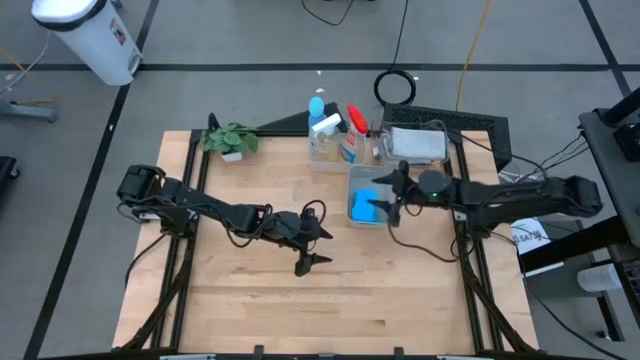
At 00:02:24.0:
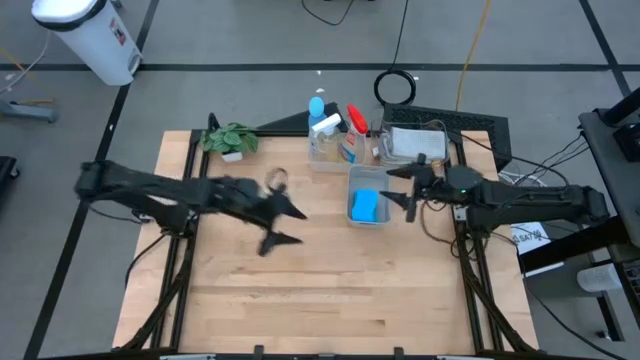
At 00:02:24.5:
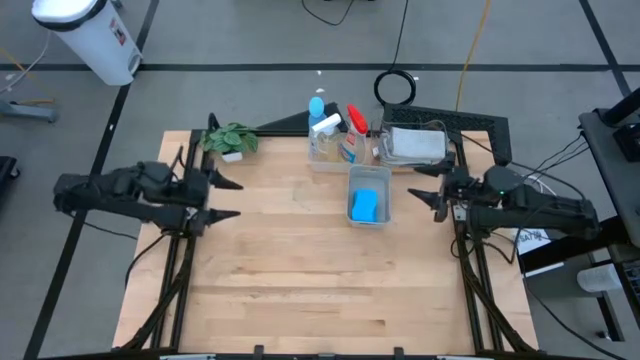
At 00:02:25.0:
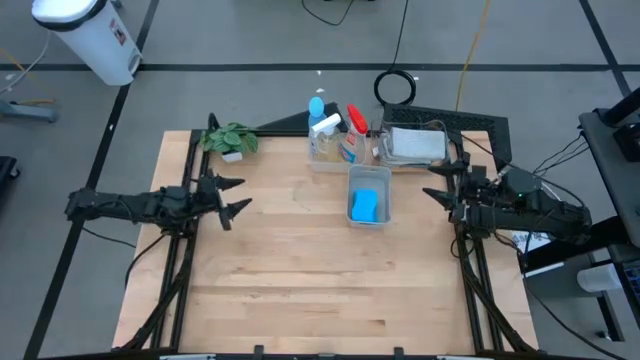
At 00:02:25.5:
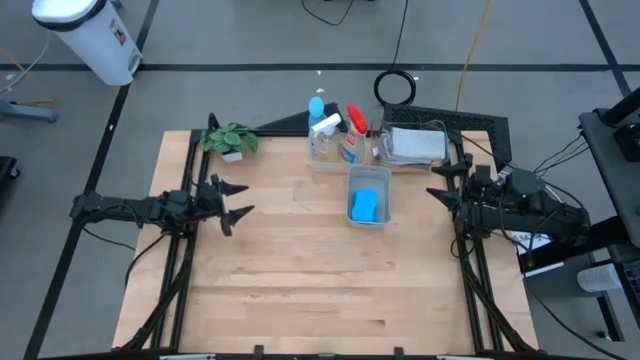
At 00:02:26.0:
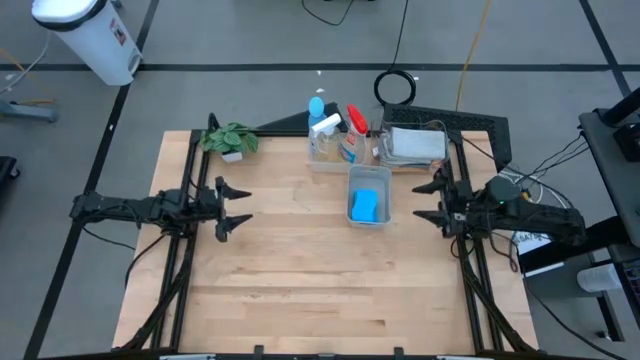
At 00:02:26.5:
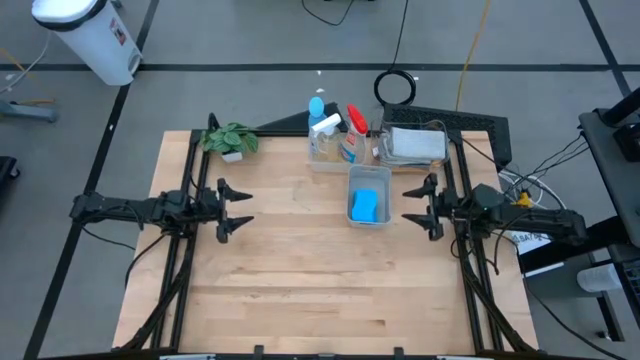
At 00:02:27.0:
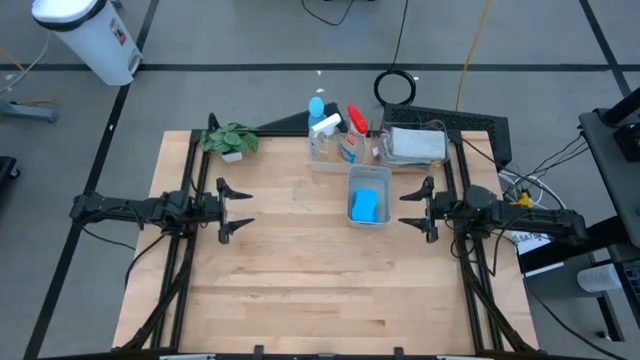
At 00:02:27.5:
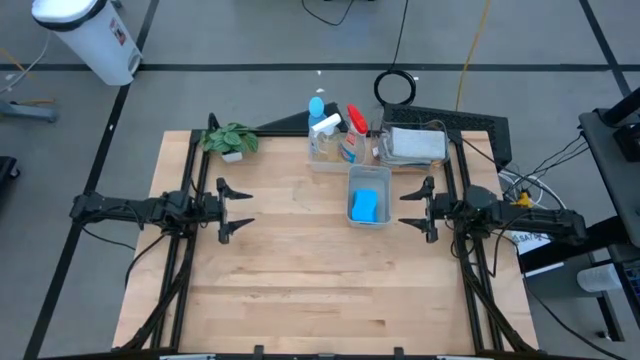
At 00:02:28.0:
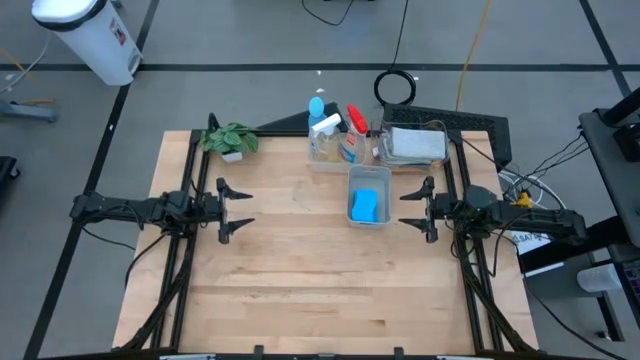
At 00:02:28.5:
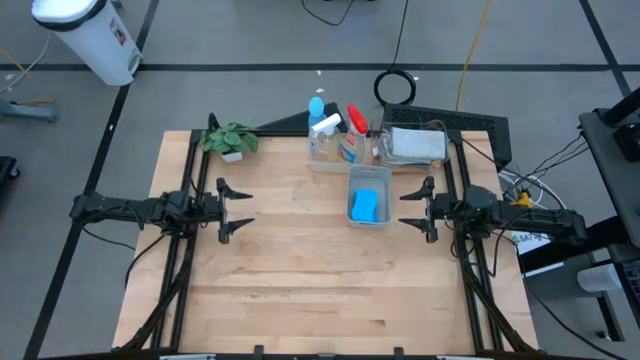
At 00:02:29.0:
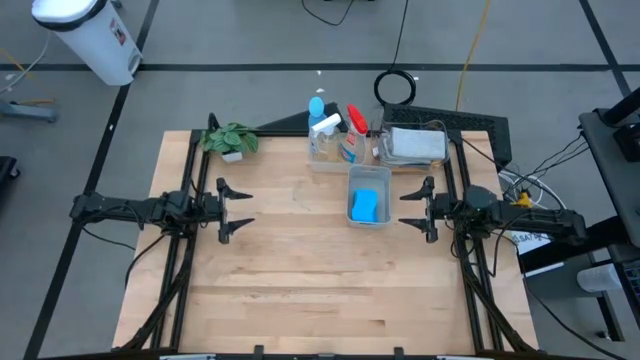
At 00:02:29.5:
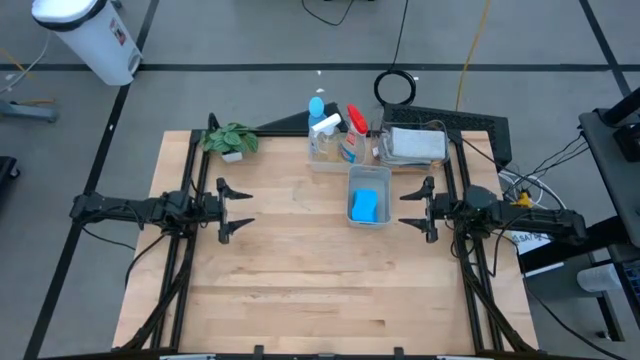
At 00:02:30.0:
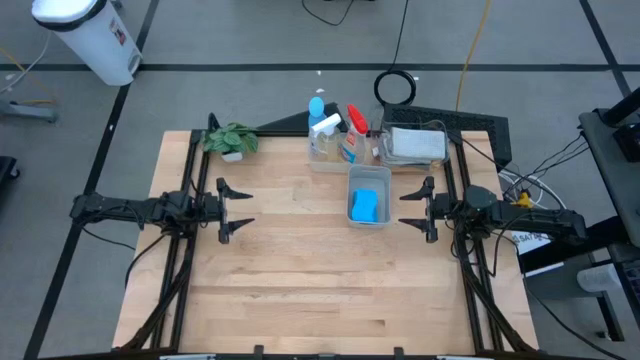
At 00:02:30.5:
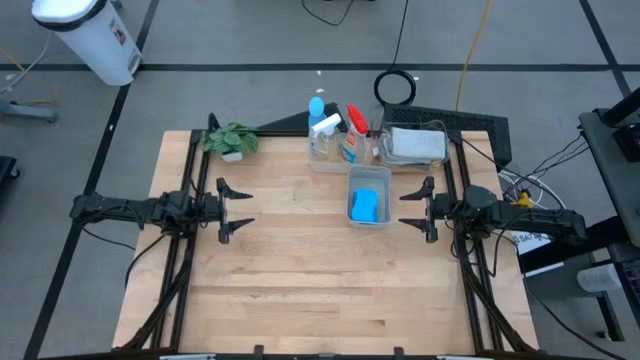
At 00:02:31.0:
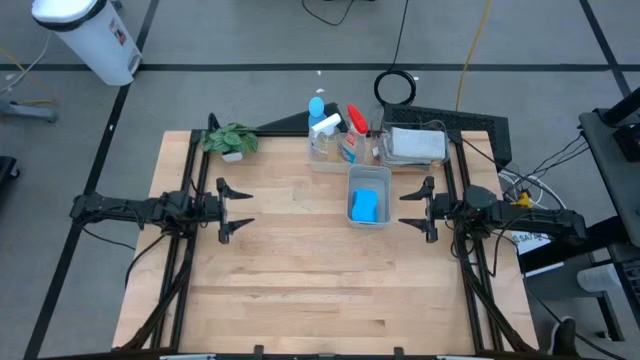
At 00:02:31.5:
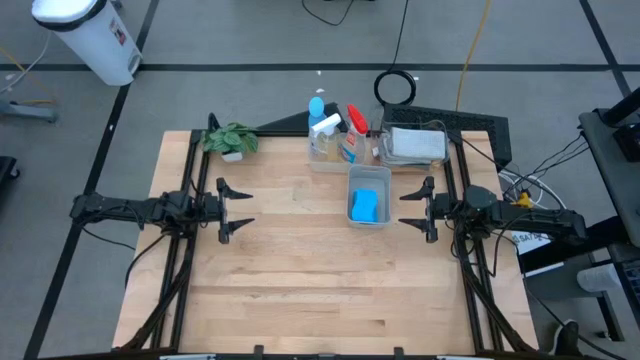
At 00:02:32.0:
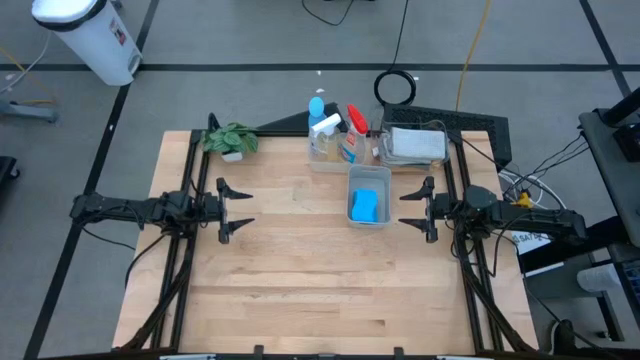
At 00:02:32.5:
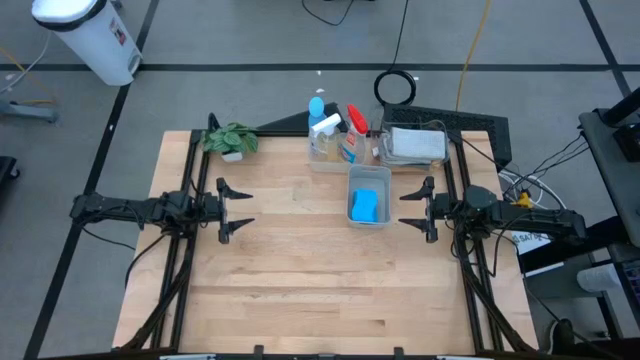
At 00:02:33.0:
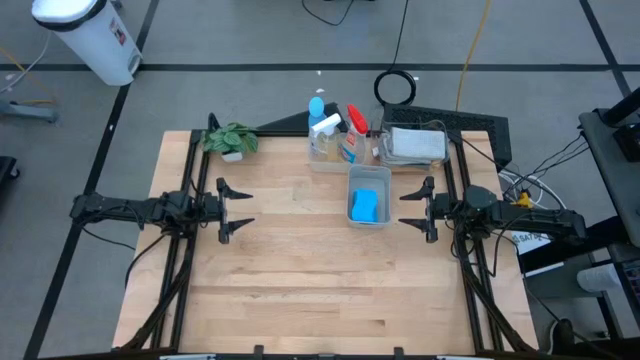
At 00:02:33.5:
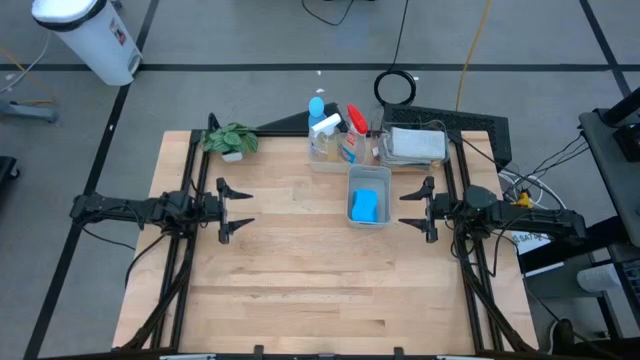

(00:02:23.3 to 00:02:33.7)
Task: Pick & Place Kitchen Items
Return to Home Position

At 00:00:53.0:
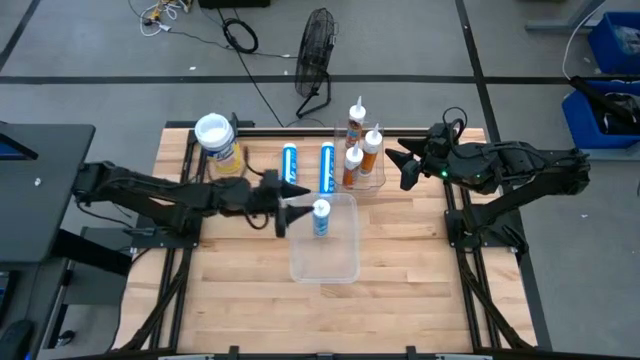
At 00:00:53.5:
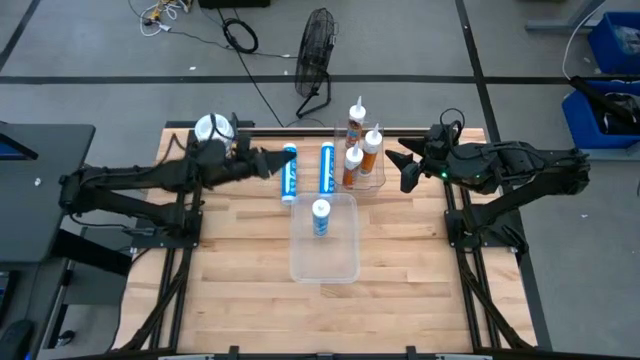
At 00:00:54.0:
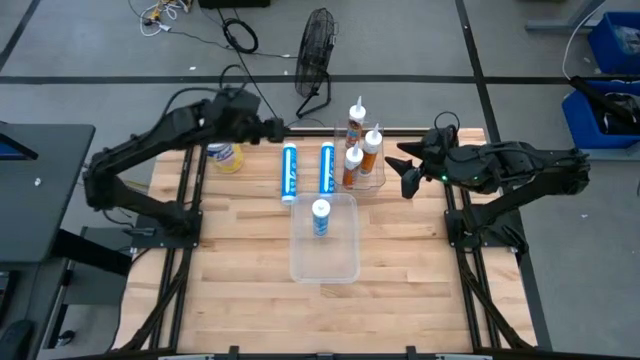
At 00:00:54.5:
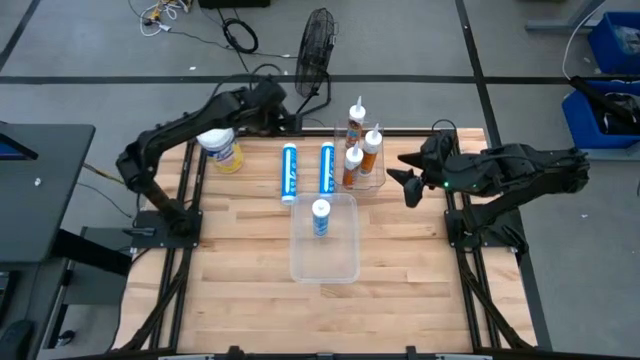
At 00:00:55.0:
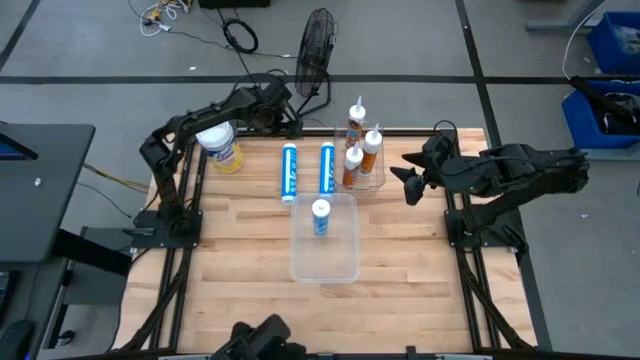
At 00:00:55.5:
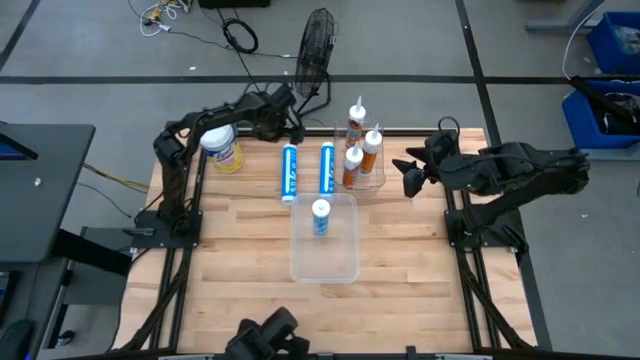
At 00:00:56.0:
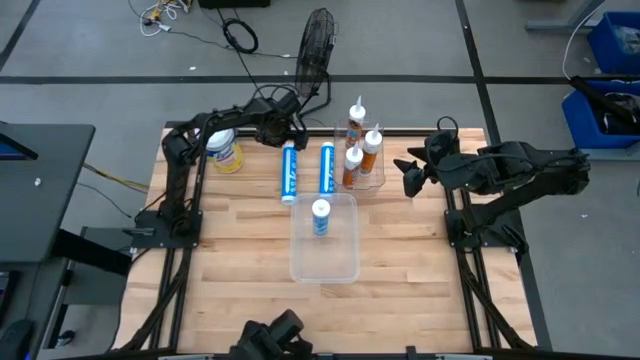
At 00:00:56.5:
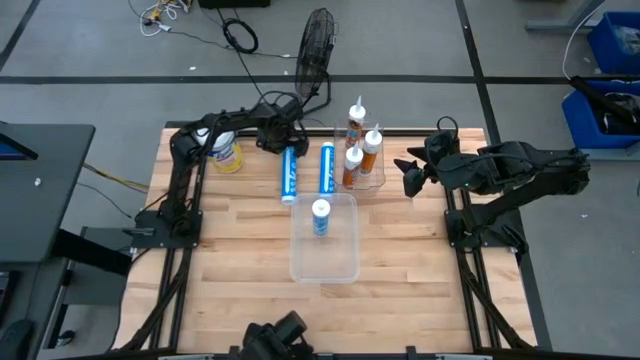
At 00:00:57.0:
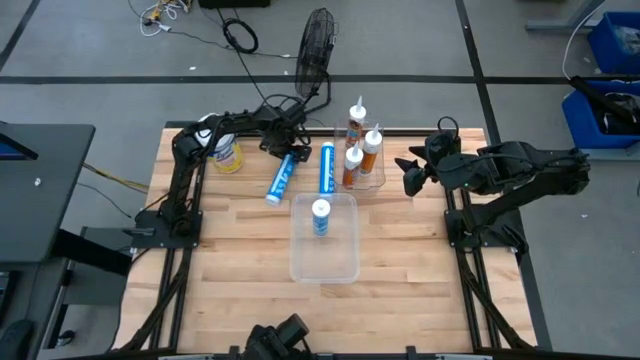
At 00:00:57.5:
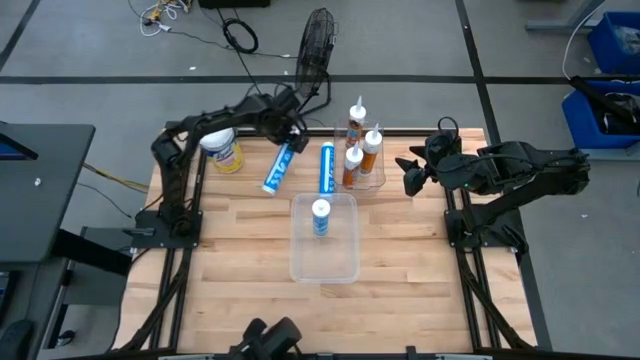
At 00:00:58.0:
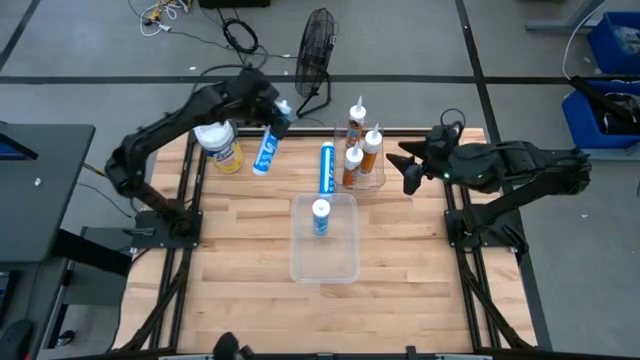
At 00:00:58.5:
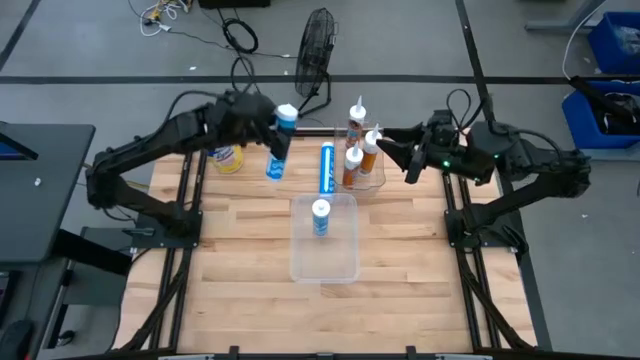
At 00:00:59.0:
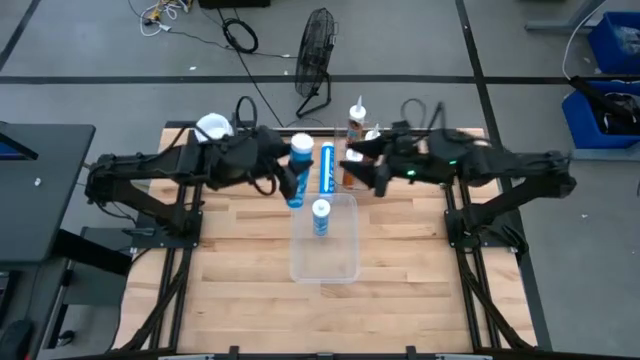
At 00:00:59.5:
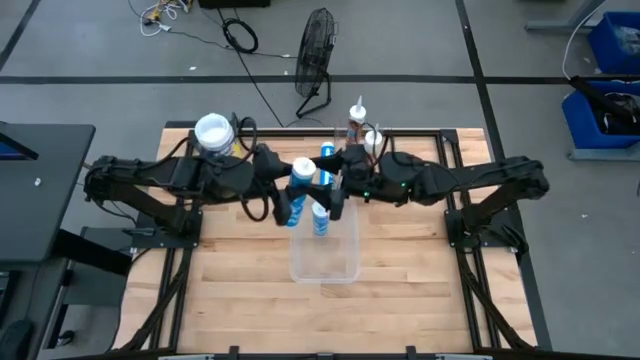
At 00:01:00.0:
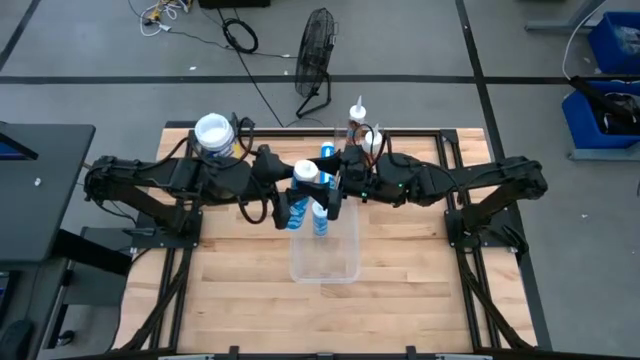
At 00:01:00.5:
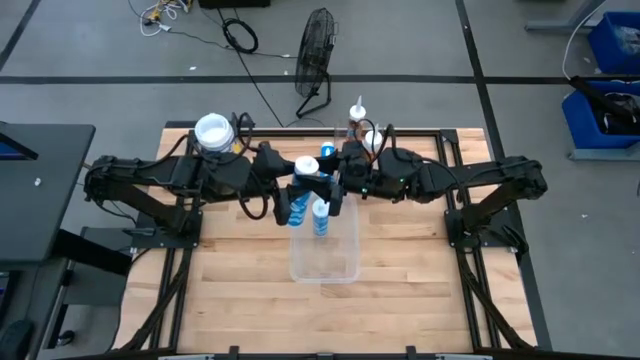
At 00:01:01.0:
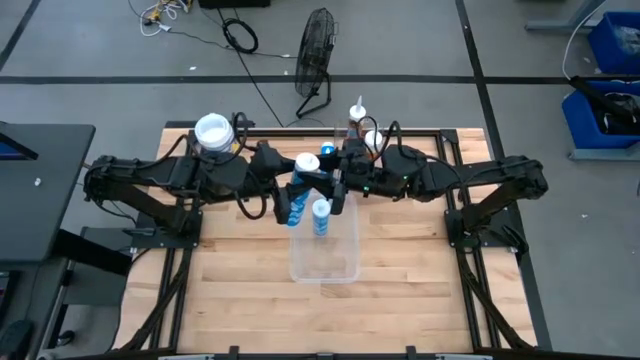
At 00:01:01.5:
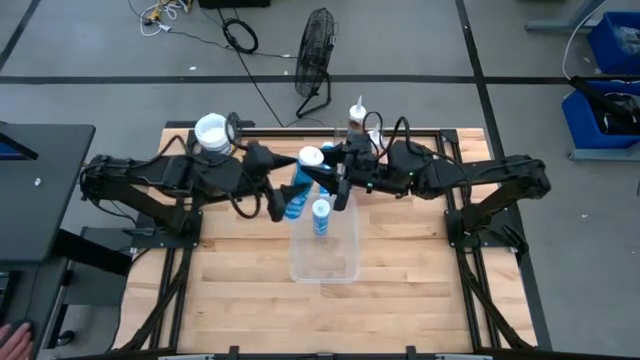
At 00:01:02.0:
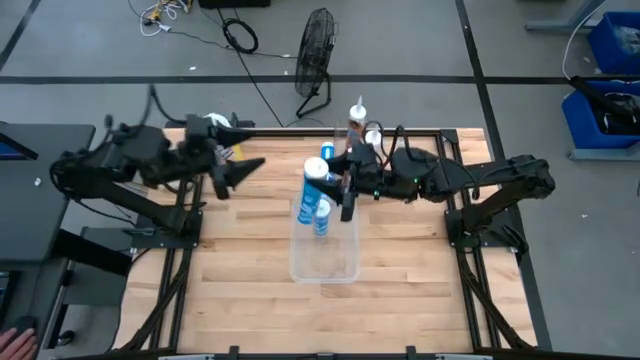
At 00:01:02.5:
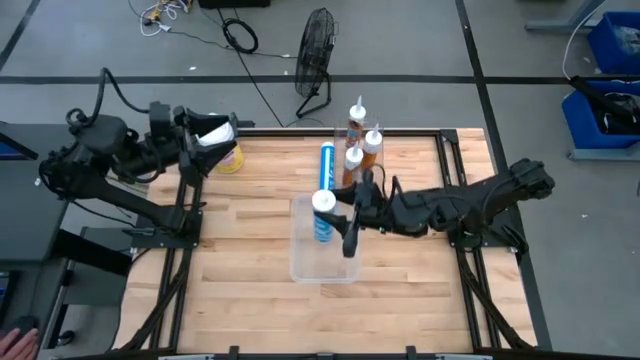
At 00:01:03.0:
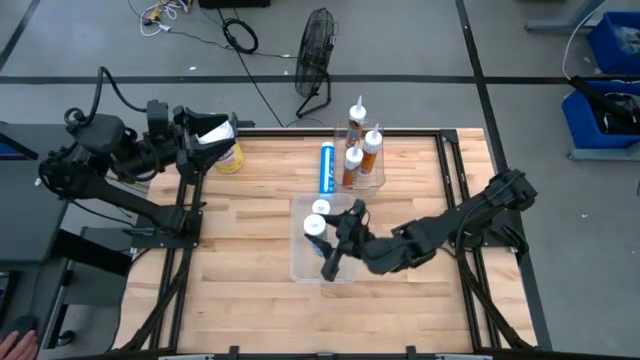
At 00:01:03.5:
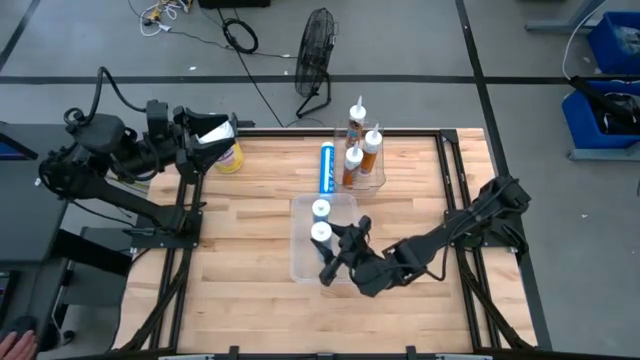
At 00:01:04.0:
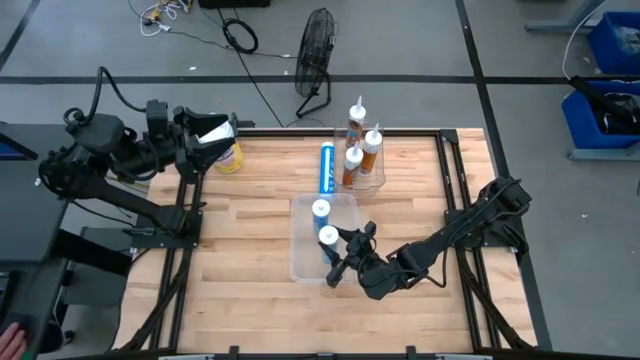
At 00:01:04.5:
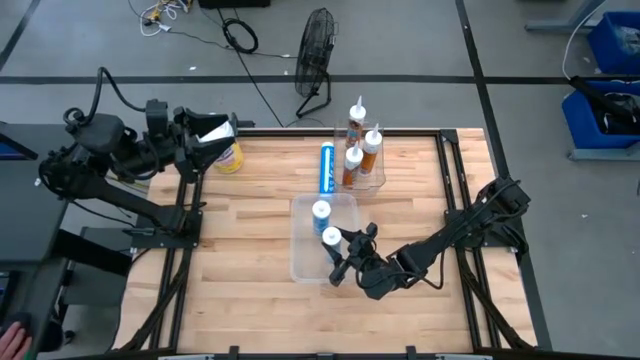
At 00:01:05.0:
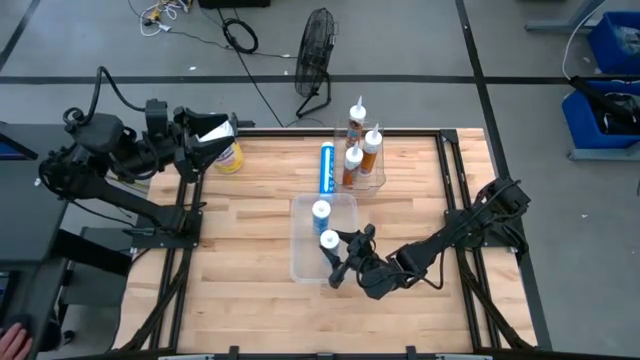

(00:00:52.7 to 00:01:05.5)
Task: Sort silicone sealant tubes
Put the left blue sealant into the bottom transparent bin
